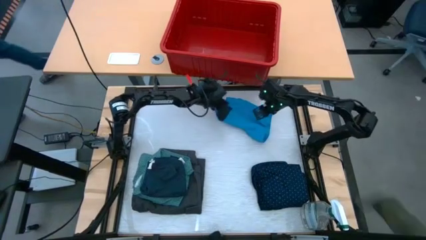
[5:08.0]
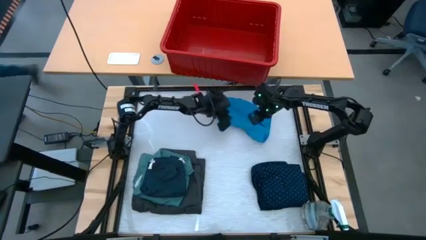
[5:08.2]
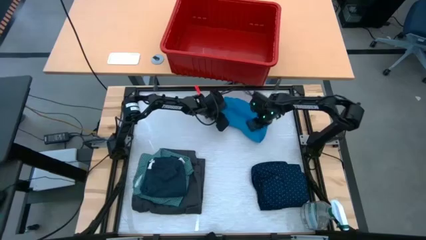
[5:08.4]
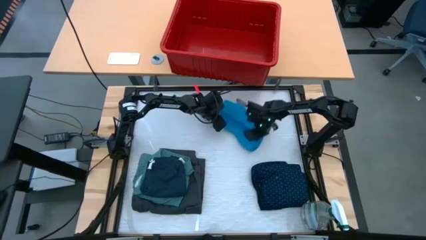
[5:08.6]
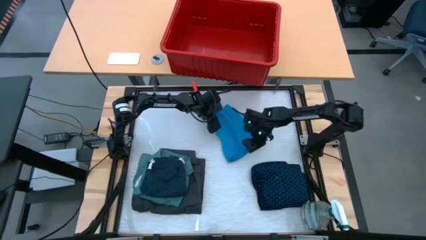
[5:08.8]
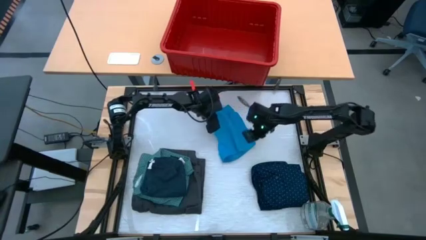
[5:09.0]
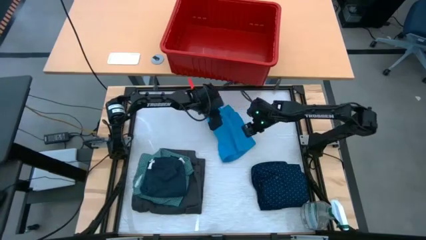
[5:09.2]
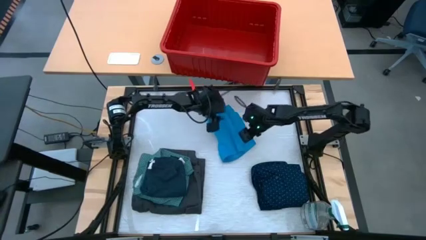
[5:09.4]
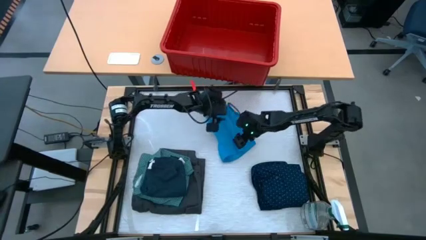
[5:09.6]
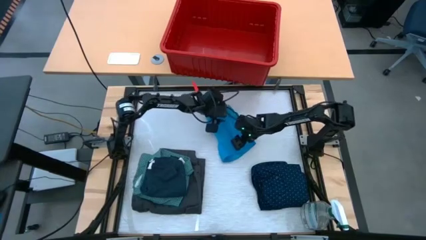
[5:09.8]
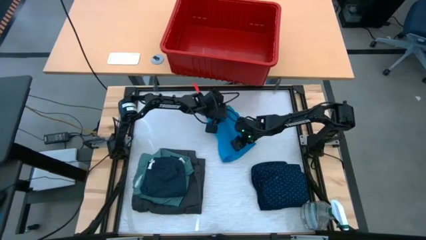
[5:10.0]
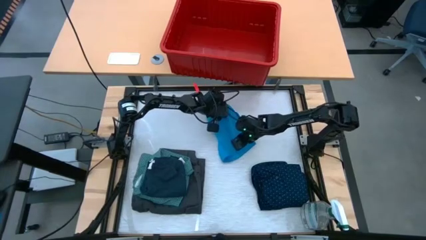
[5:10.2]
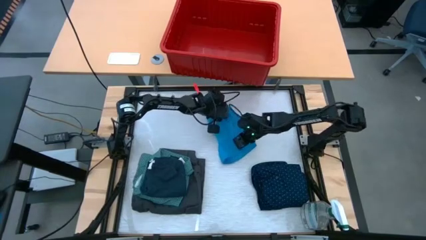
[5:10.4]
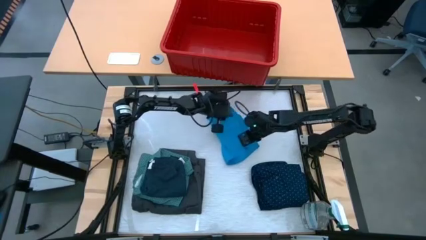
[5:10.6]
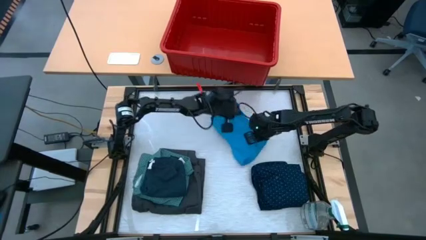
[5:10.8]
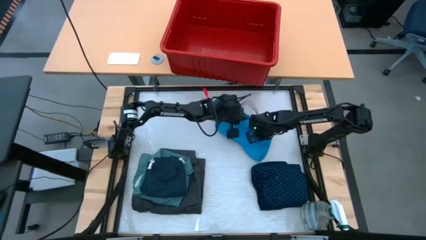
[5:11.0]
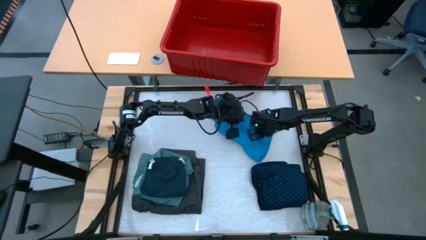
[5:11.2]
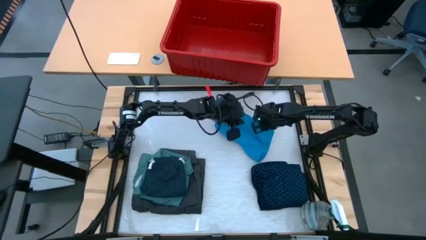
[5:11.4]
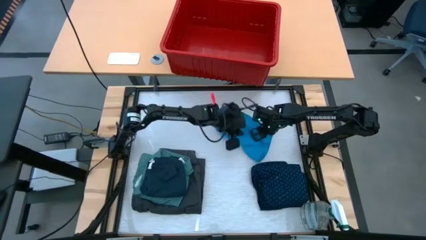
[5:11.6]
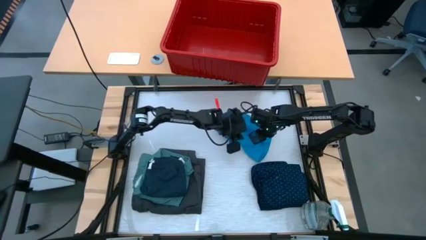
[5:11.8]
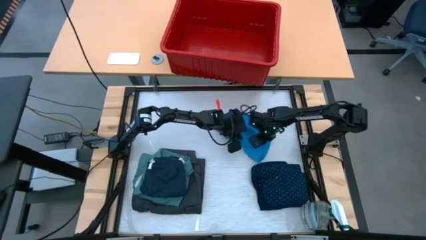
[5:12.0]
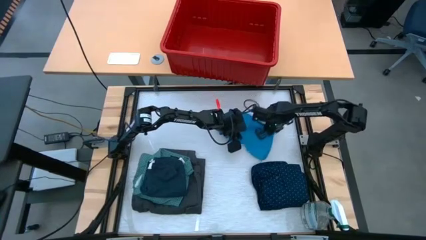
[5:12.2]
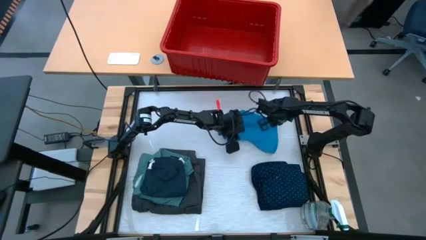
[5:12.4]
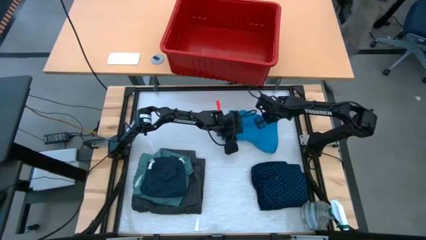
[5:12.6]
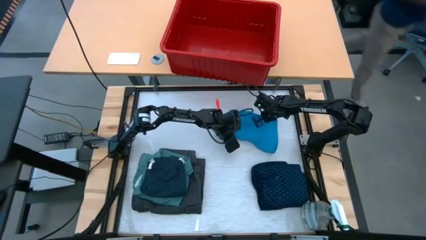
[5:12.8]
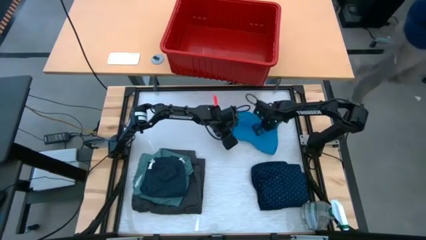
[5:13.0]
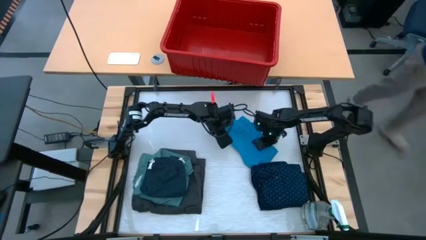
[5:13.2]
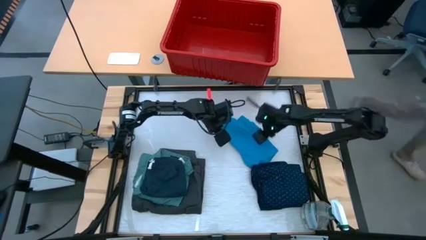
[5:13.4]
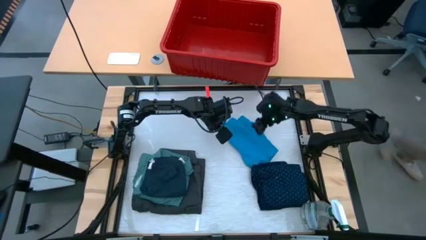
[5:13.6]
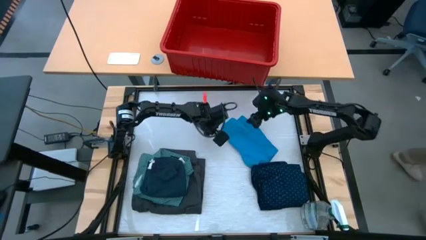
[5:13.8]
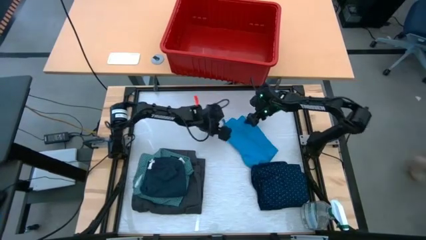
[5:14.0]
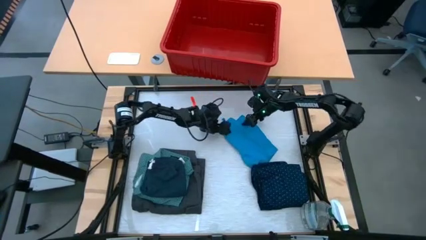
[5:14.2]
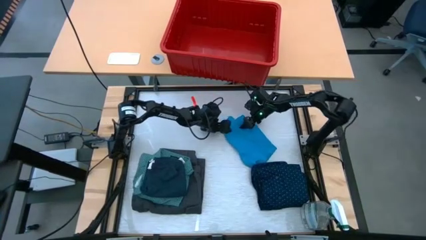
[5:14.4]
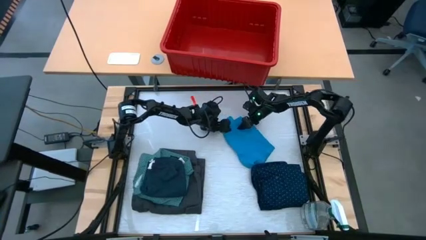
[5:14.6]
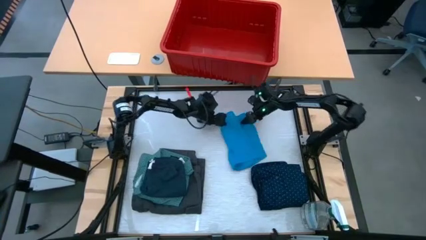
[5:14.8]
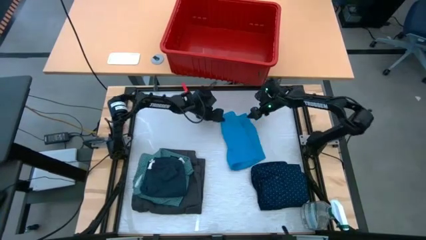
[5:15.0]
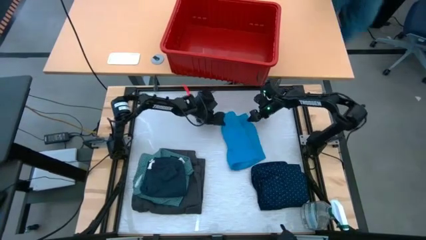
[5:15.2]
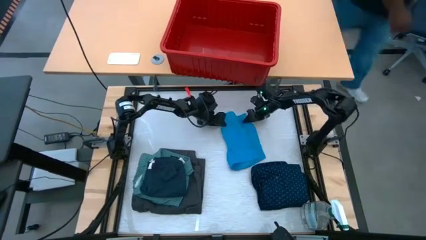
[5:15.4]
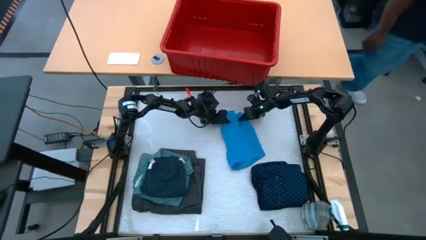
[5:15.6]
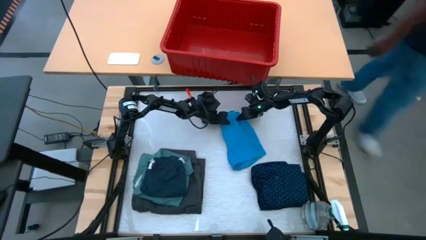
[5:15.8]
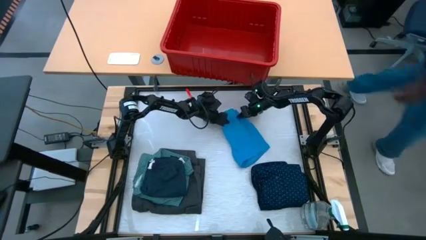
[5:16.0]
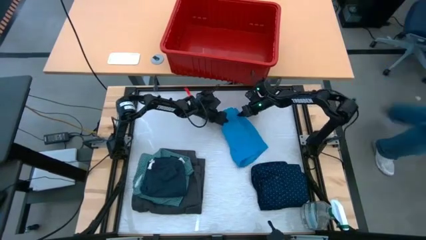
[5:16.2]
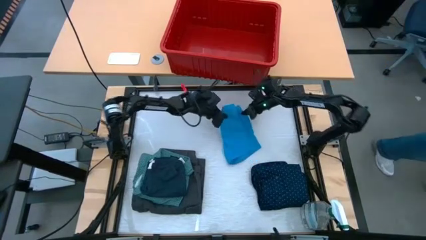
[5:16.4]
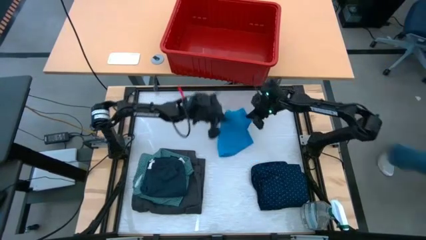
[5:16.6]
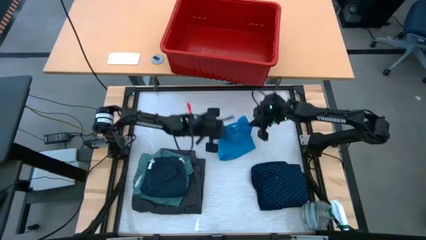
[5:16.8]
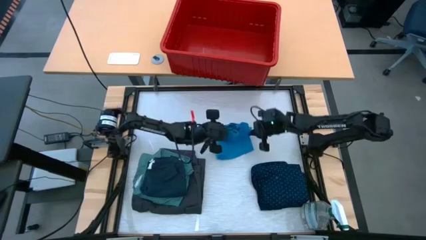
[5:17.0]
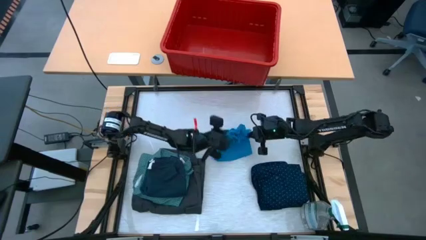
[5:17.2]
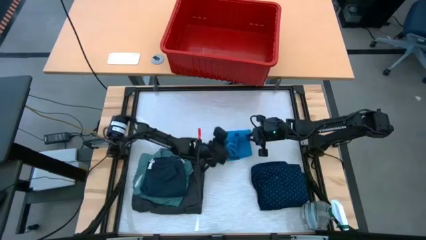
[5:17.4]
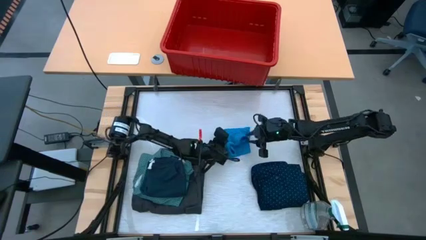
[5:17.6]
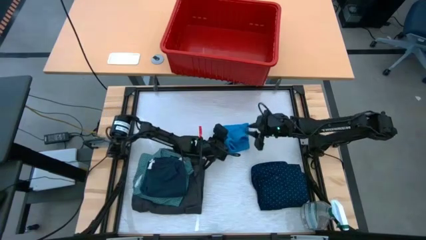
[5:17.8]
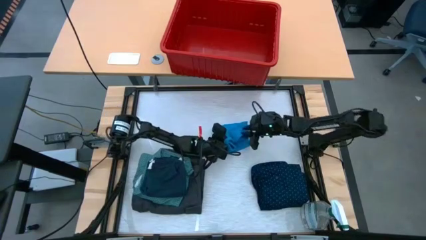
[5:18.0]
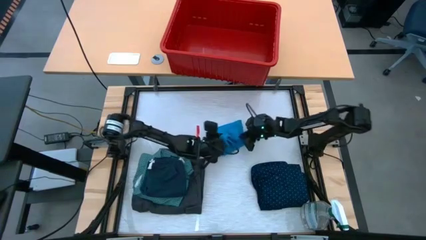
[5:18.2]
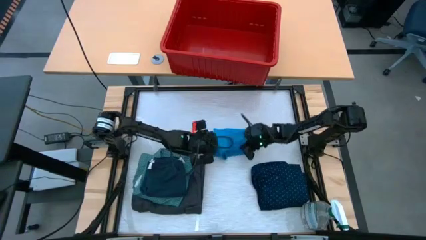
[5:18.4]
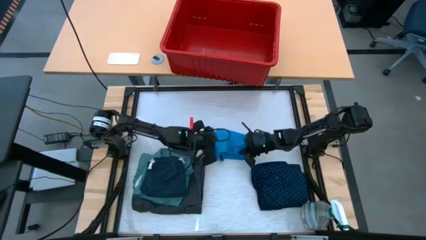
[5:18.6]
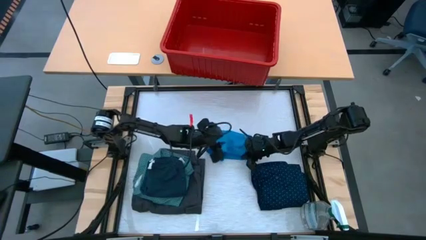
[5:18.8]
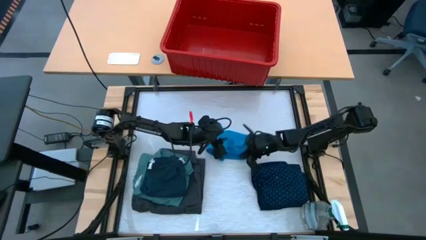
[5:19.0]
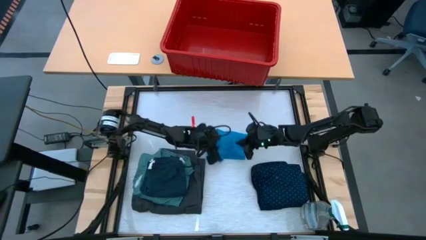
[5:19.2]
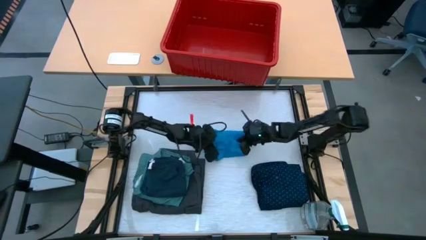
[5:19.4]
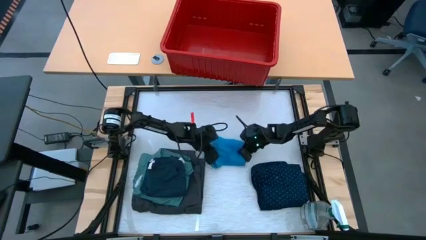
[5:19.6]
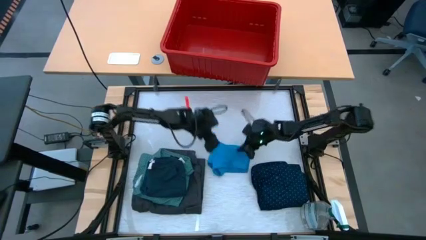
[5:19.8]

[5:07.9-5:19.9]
Task: Fold laundry
Fold the light blue shorts

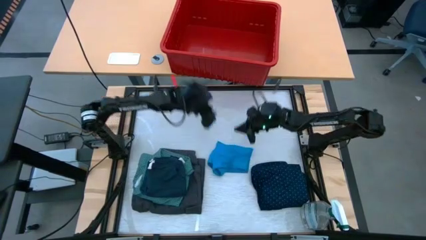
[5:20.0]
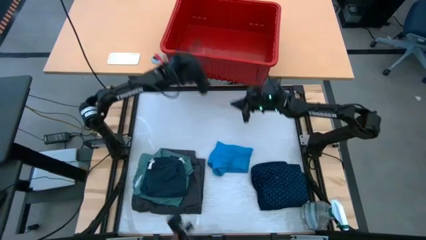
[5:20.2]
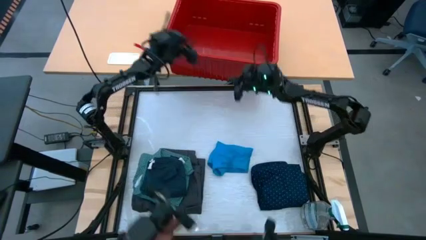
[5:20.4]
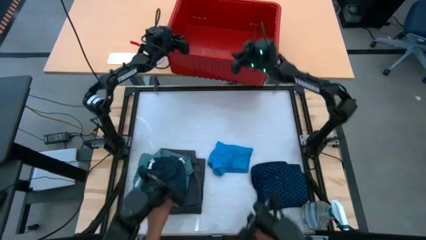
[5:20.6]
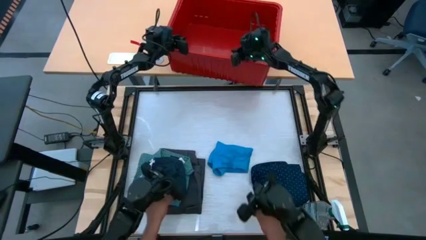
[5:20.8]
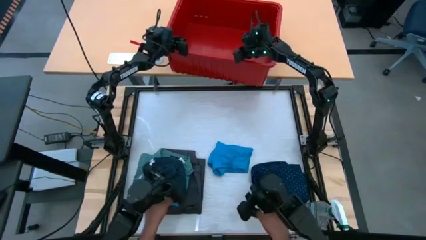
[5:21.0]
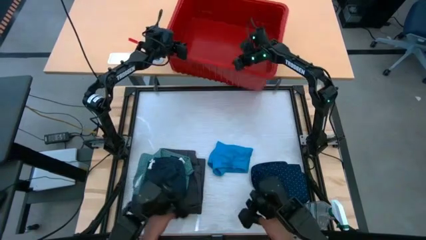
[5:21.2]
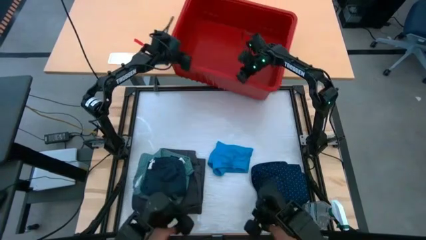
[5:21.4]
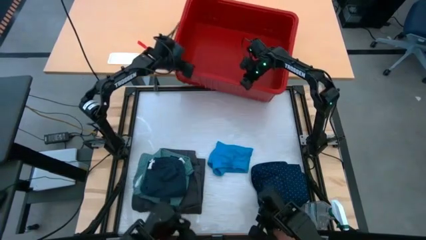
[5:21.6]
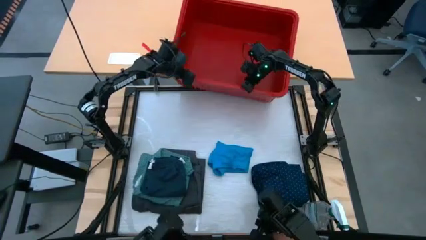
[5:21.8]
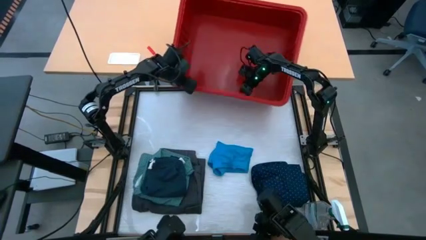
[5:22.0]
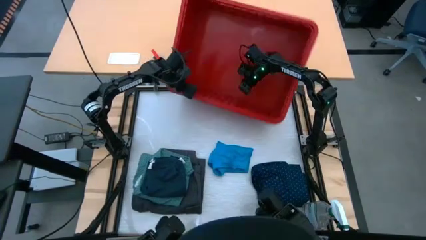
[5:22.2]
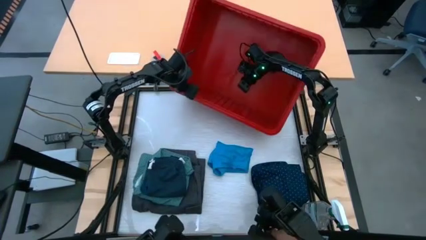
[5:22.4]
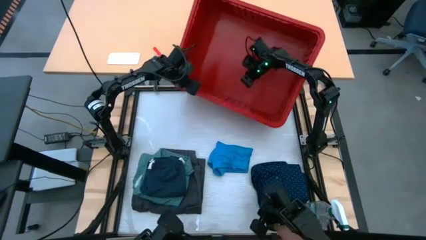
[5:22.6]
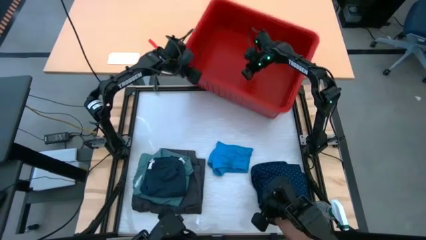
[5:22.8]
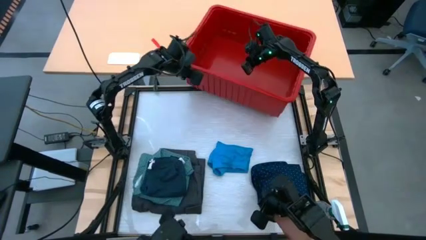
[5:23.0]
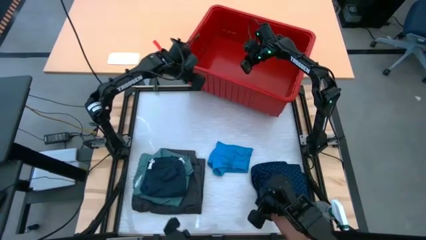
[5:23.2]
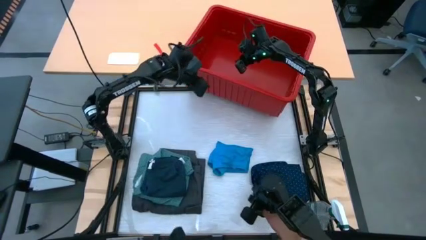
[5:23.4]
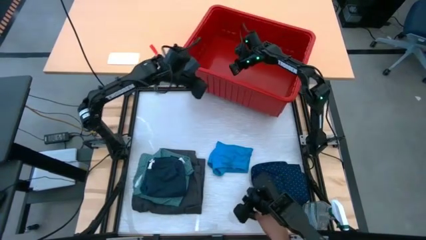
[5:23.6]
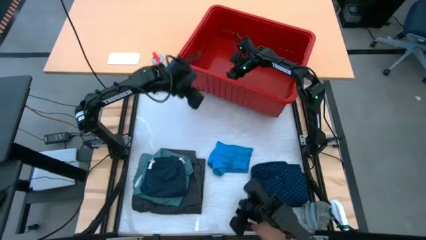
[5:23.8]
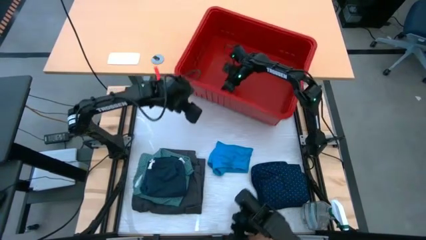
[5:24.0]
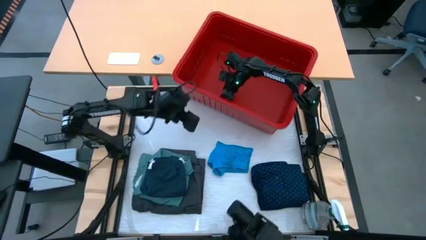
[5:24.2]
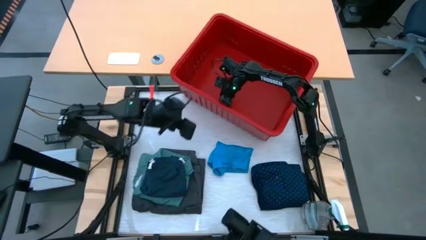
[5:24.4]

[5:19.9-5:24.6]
Adjust the red bin

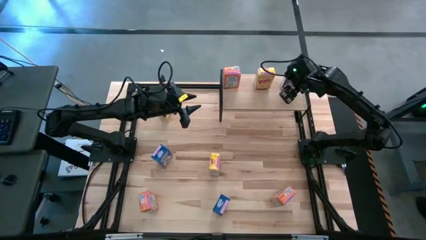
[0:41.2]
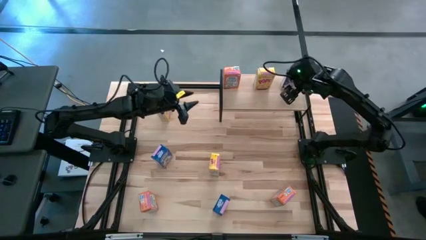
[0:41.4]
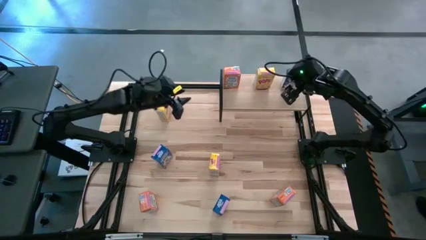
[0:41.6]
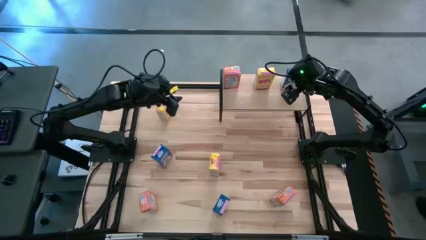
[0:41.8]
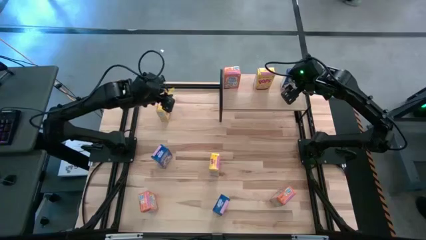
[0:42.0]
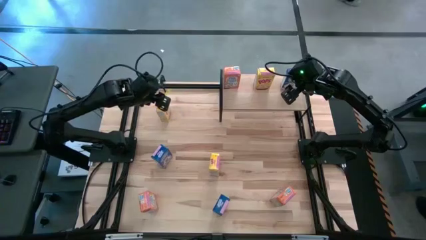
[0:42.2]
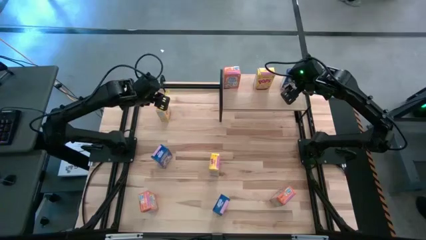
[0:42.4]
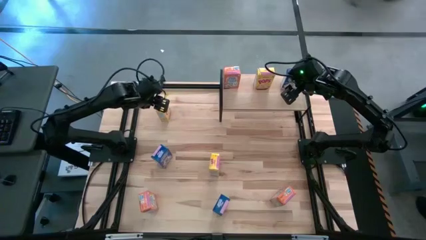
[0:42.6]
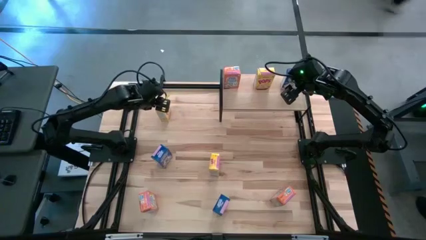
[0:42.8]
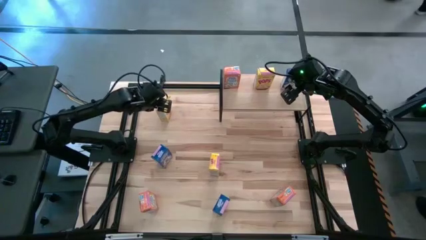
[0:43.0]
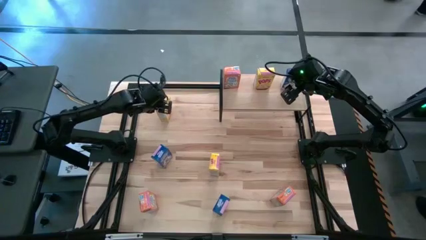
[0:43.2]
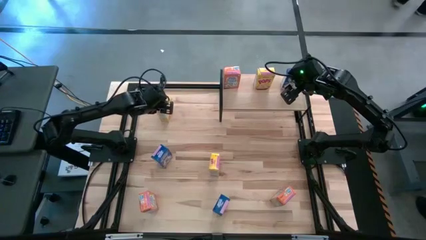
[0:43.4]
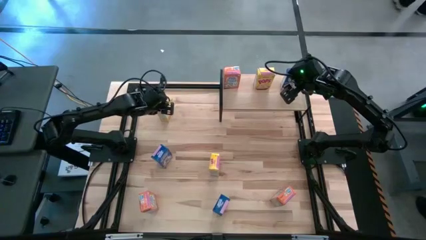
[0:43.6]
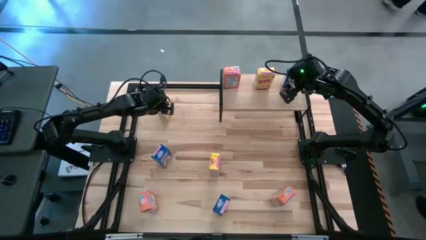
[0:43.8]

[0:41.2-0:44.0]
Task: Stack cereal on shelf
Put the top yellow cereal box on the shelf aligned with the yellow cereal box
